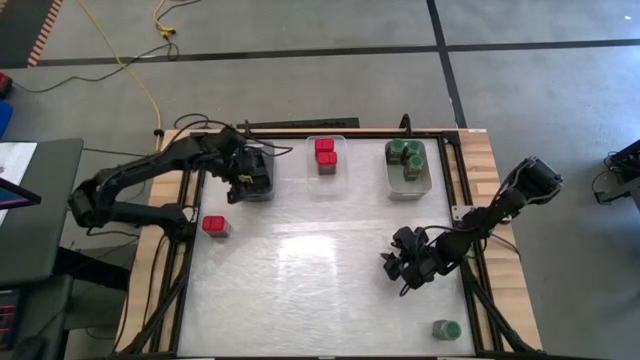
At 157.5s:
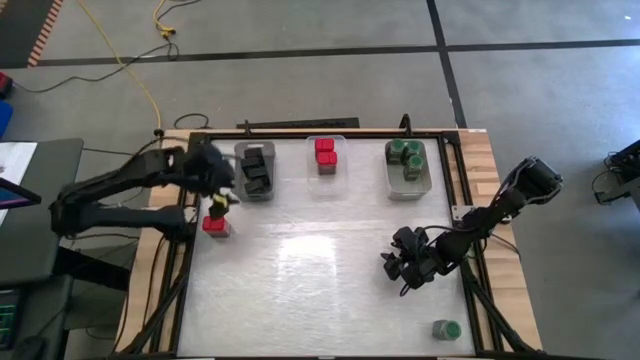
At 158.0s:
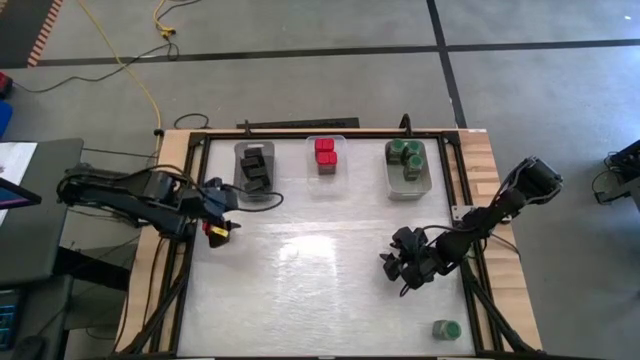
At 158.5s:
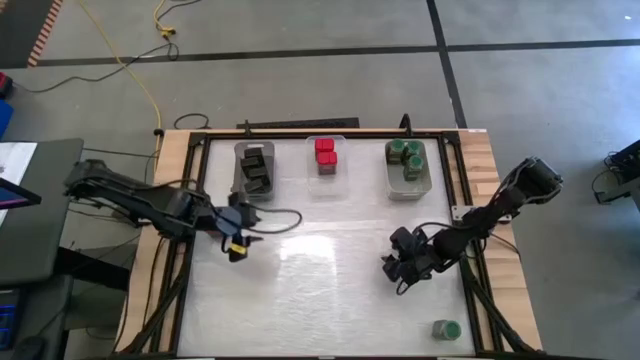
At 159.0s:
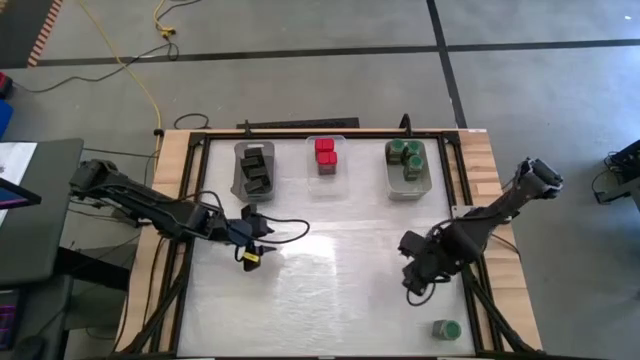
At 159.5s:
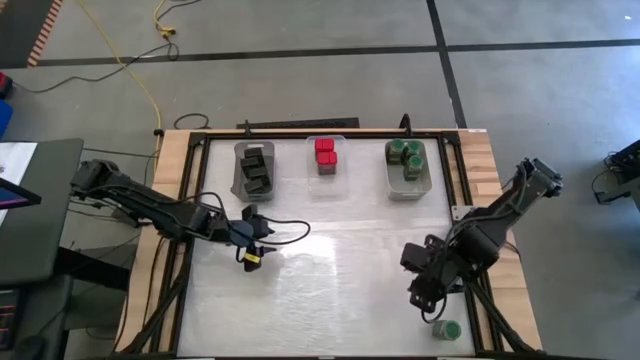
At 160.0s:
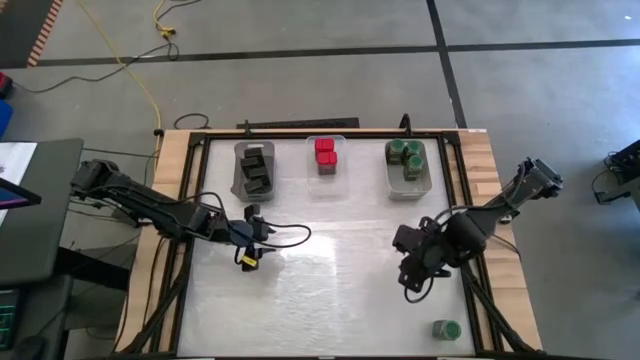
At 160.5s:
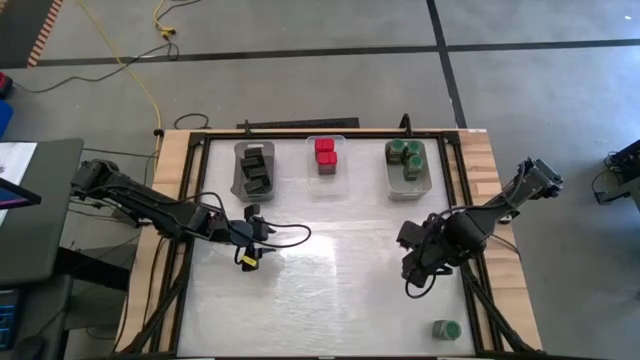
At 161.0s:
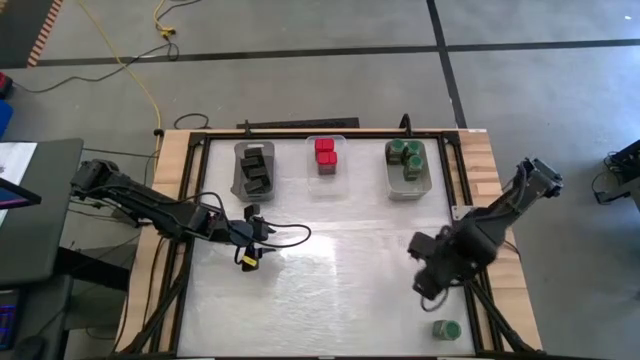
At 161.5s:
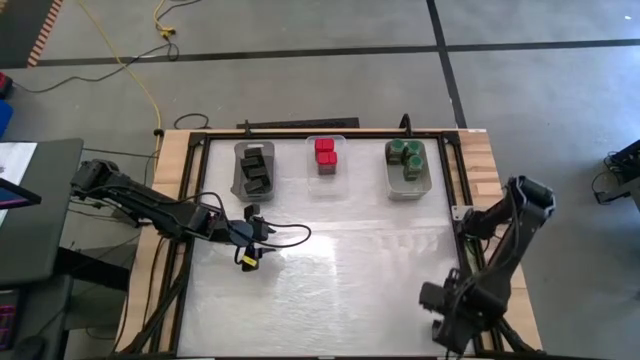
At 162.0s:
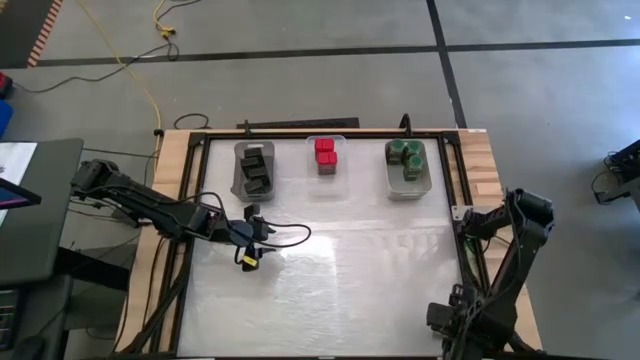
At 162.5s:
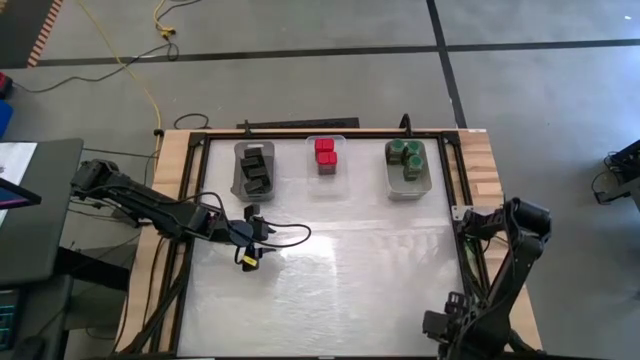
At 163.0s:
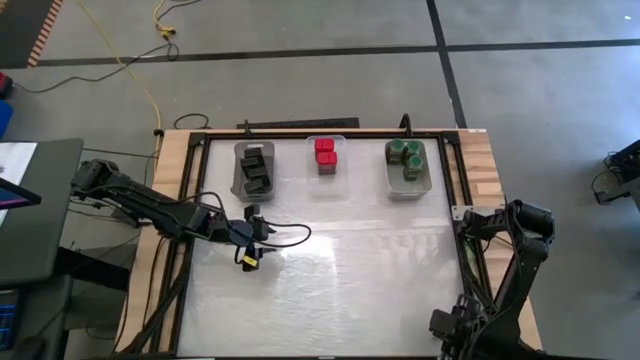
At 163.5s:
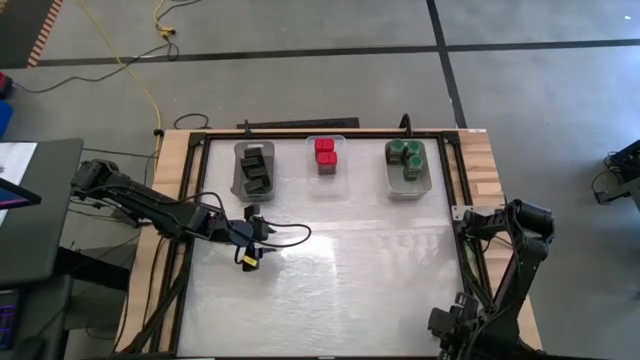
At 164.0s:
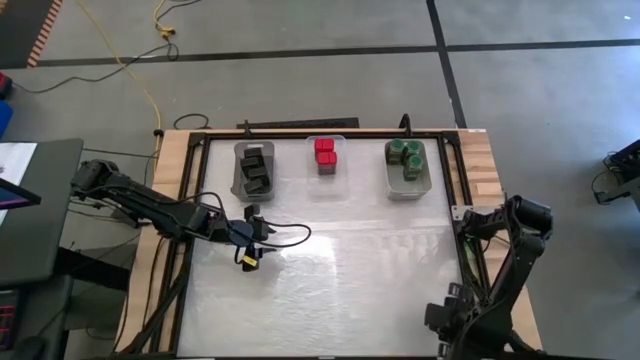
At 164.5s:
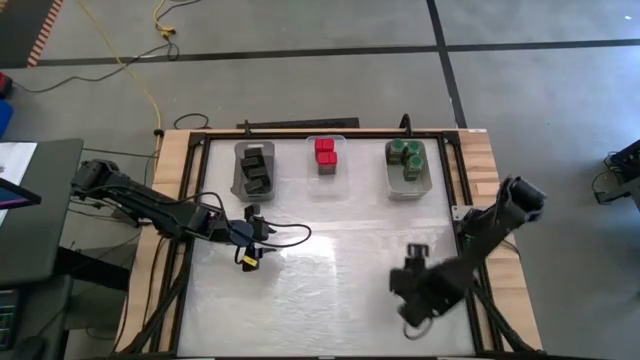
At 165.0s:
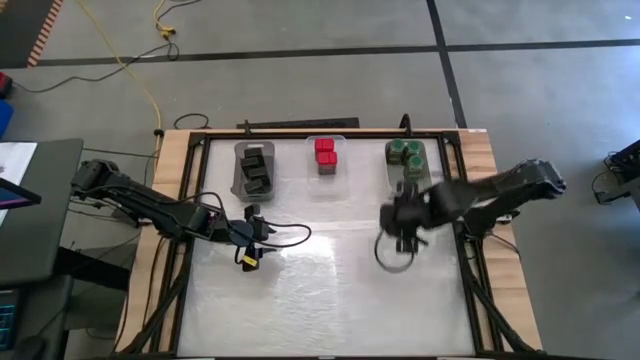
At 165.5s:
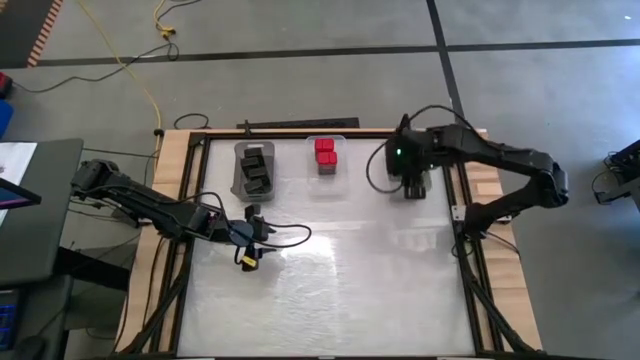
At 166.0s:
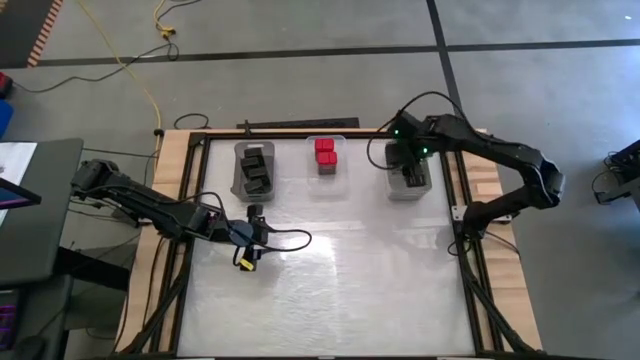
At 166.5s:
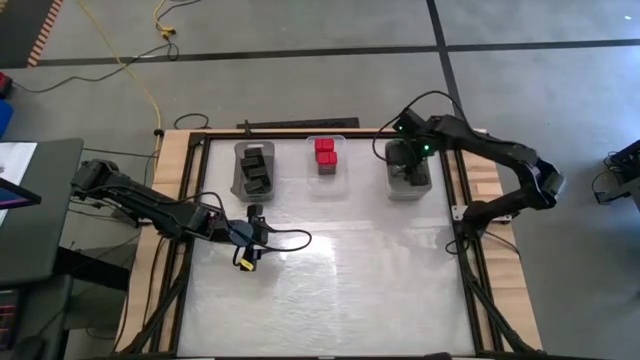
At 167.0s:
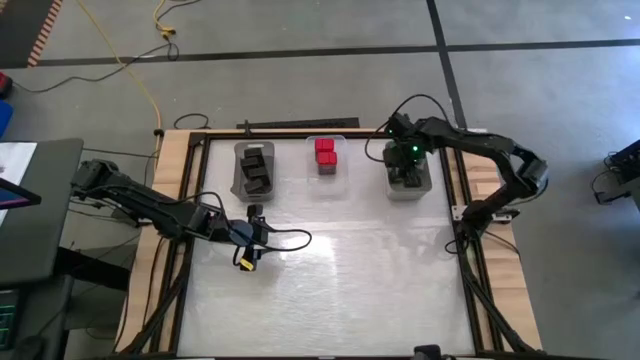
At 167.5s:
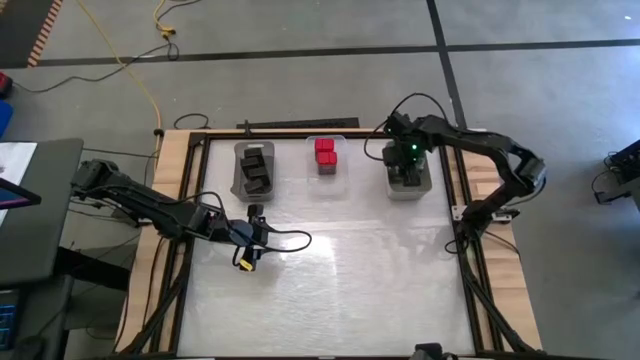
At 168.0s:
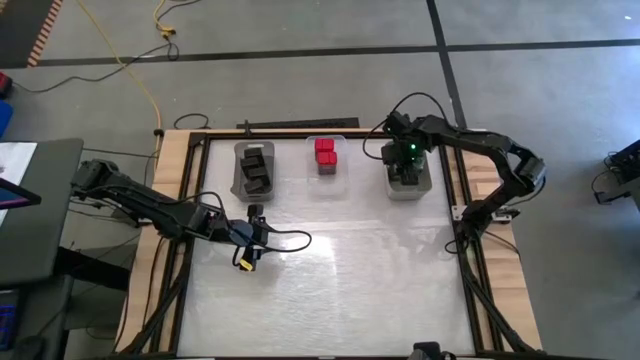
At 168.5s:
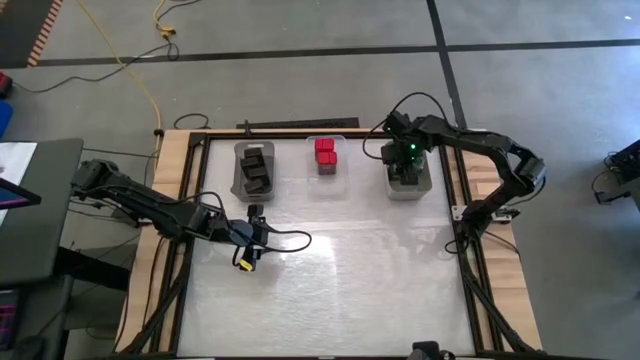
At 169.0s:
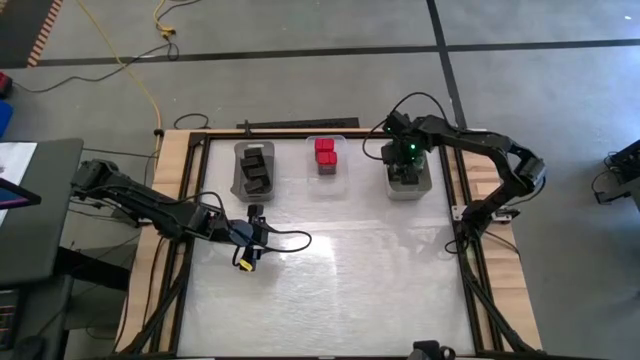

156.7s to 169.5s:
Task: Sort spices by type
Put the green seasoning bottle into the gray bin

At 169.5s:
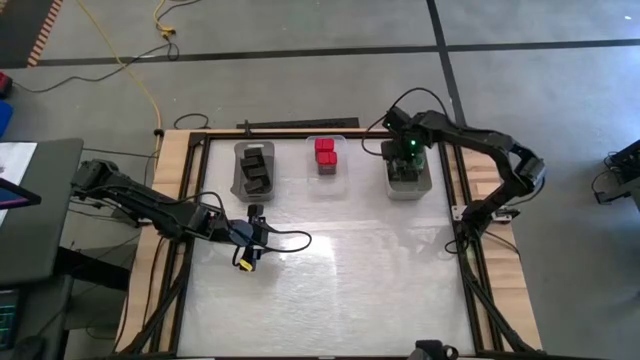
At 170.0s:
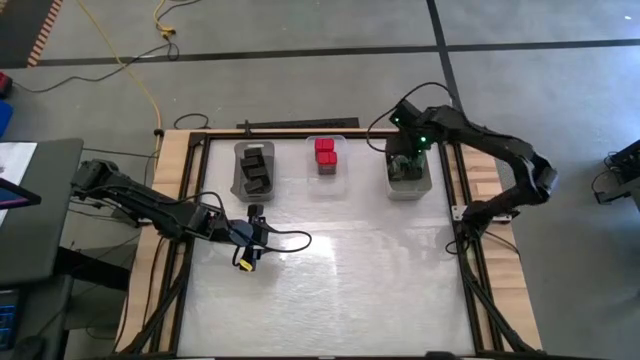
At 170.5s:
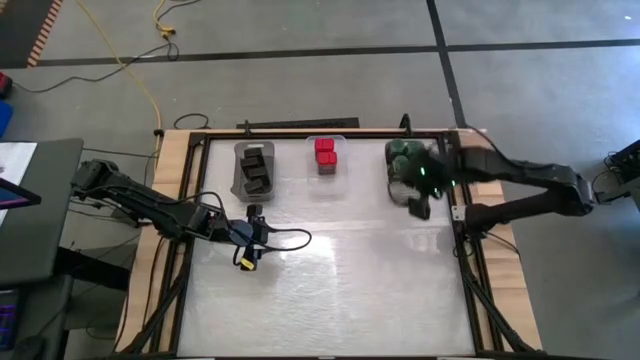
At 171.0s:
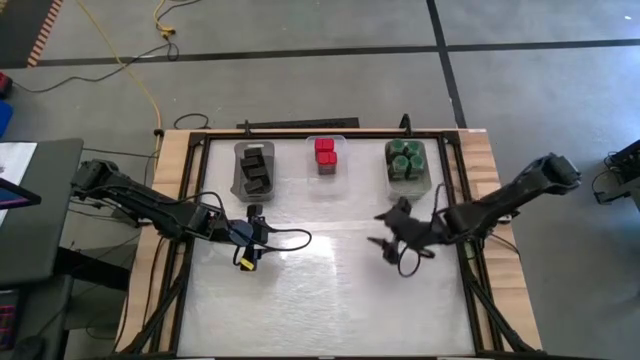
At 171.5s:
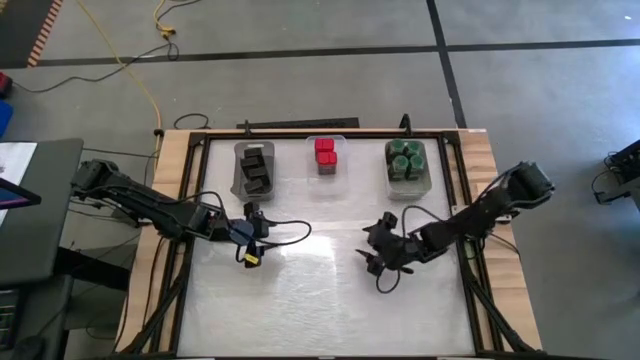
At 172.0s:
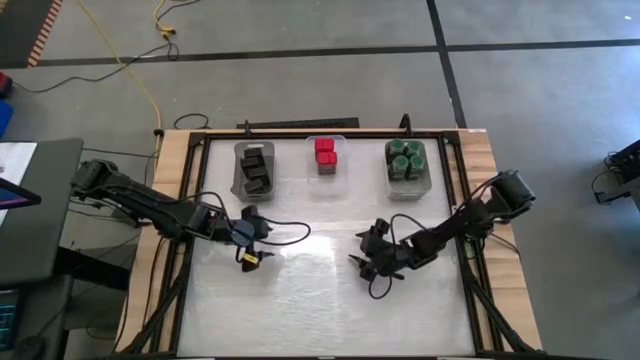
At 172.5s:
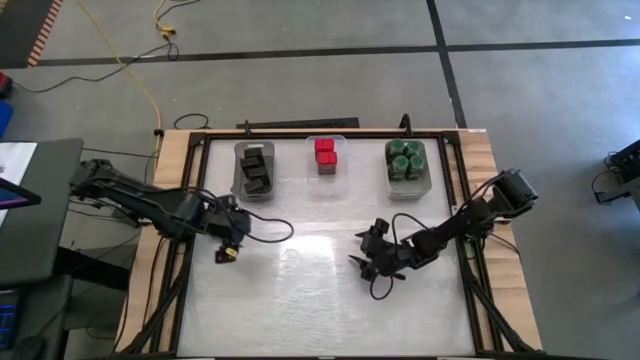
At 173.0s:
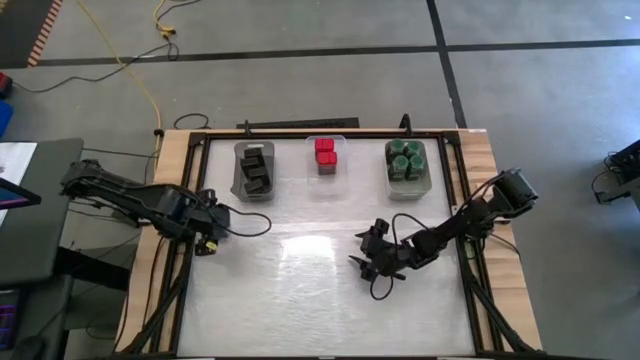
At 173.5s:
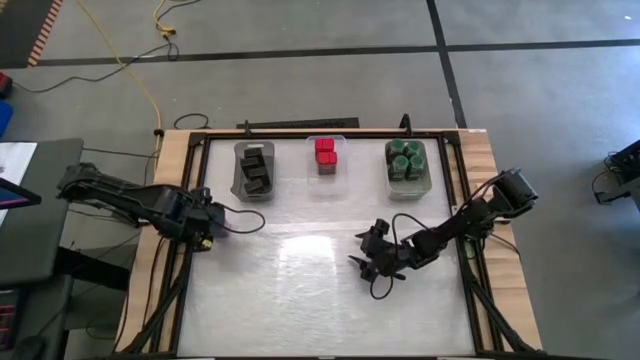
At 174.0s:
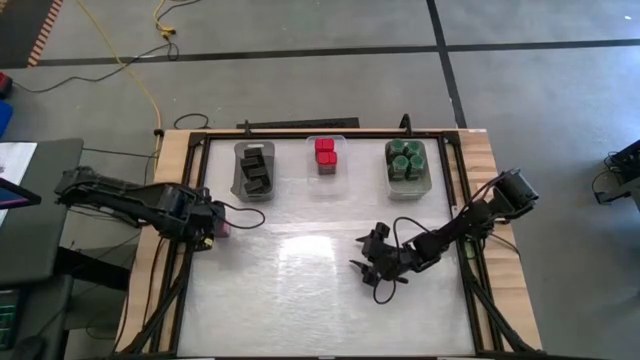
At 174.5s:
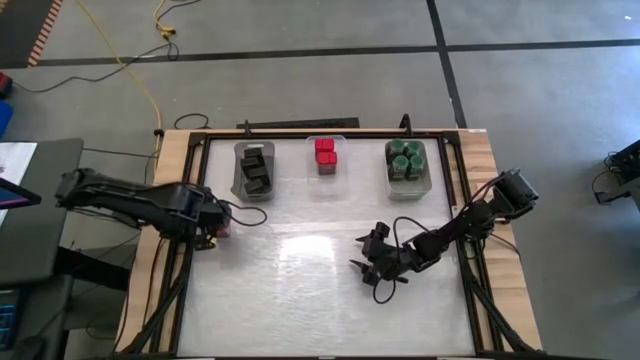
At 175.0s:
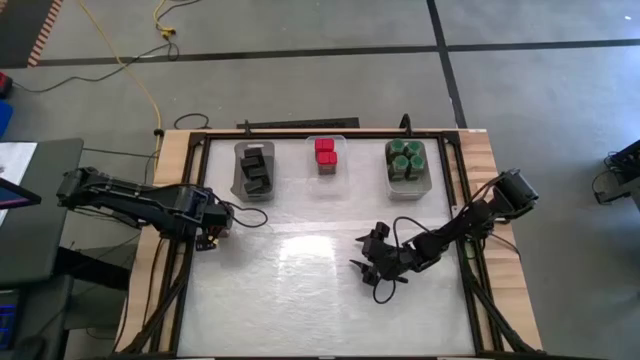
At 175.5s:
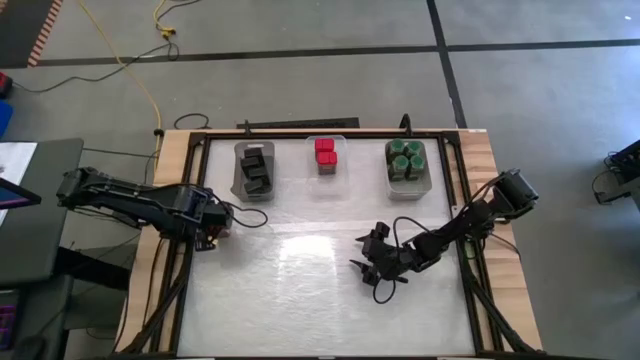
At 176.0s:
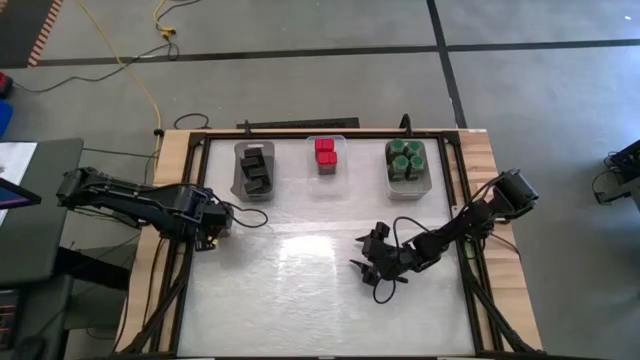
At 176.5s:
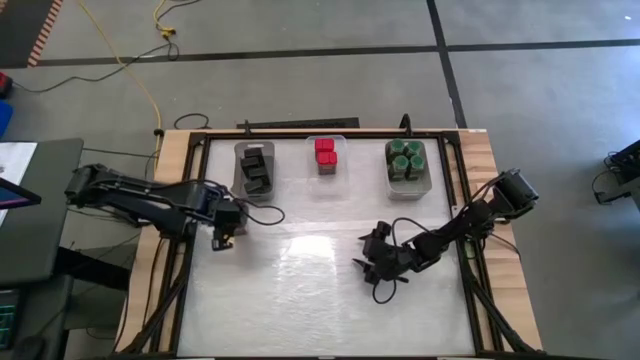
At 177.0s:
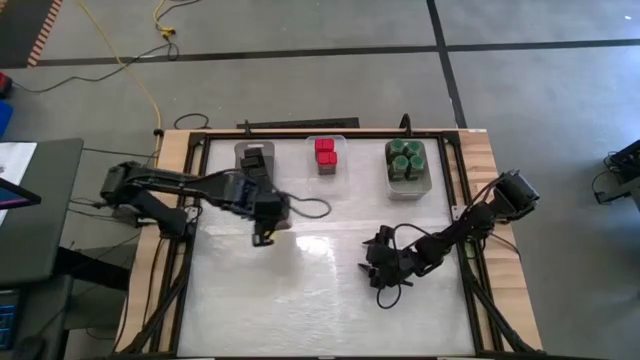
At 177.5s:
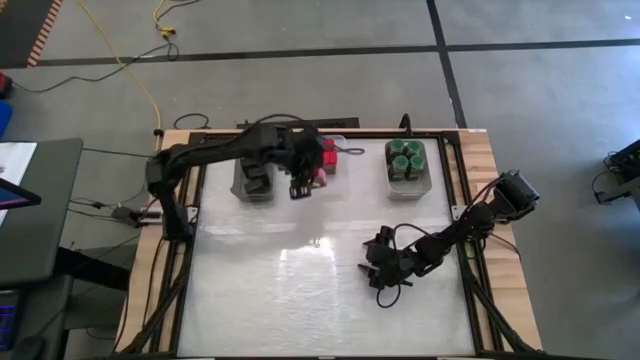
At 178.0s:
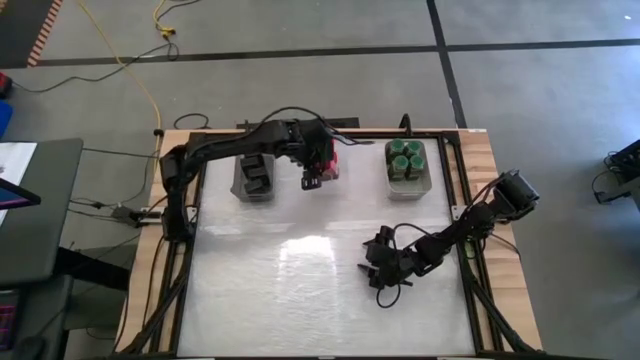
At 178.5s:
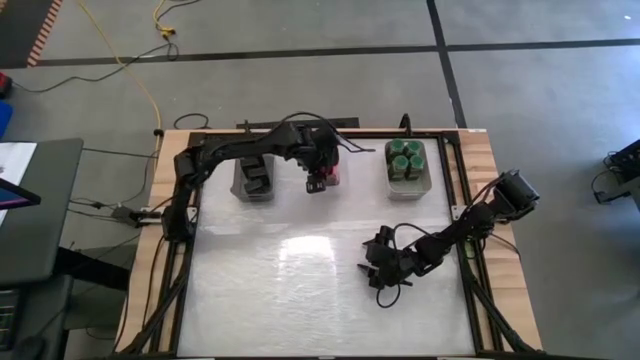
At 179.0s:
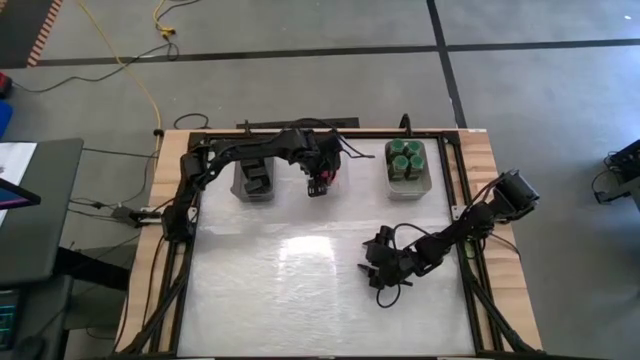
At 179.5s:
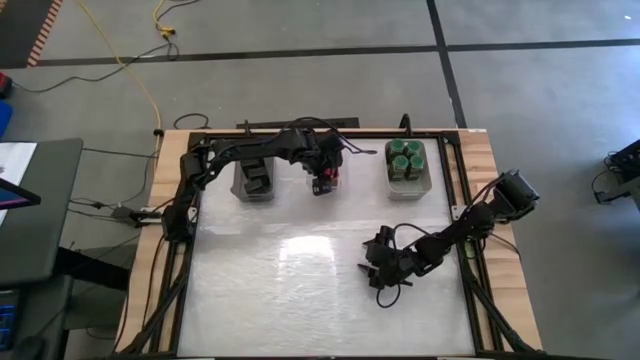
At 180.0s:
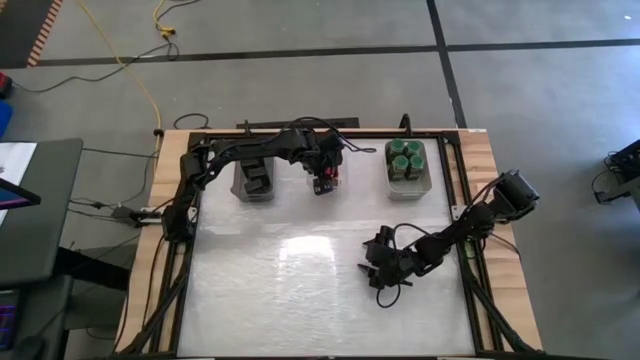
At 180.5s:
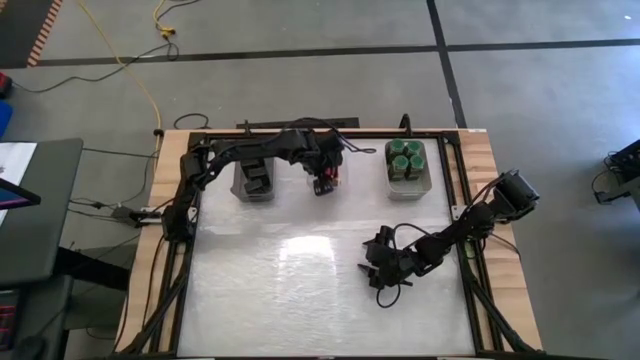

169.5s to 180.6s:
Put the red seasoning can into the transparent bin
